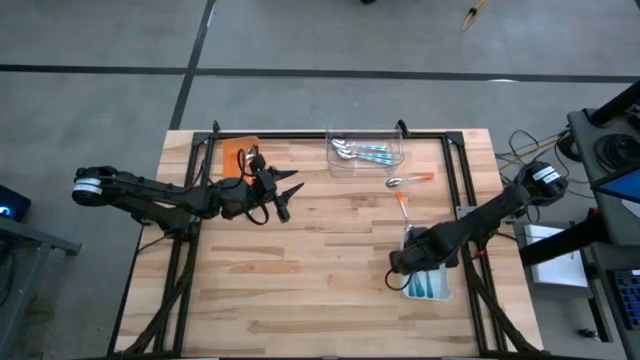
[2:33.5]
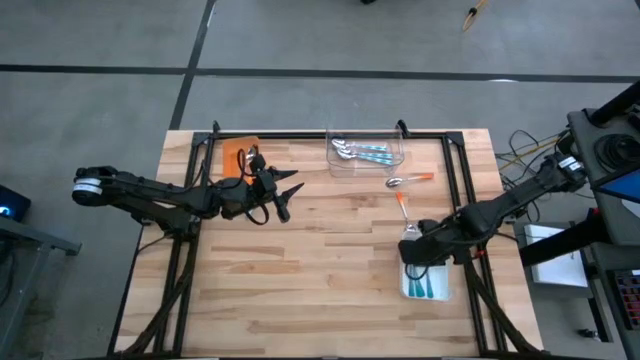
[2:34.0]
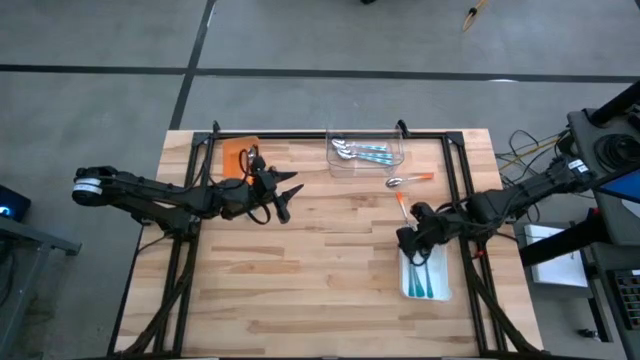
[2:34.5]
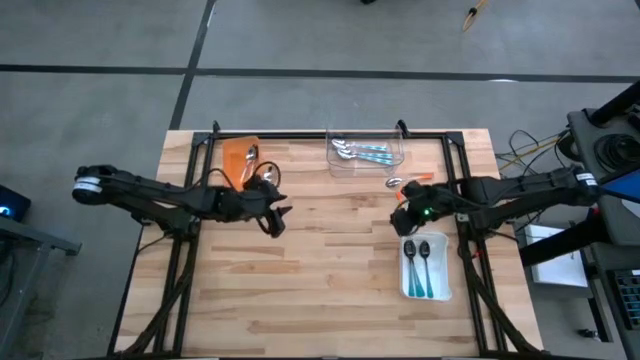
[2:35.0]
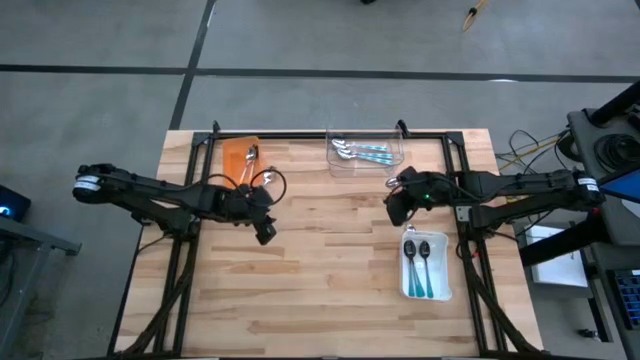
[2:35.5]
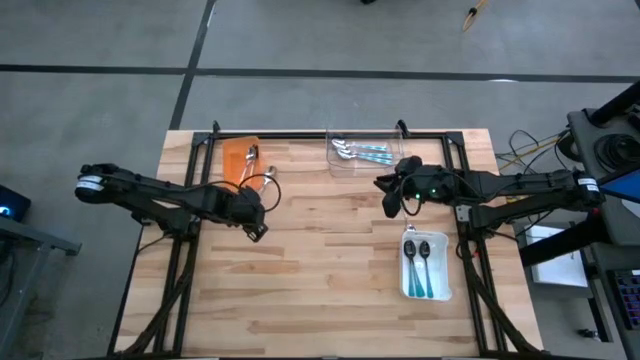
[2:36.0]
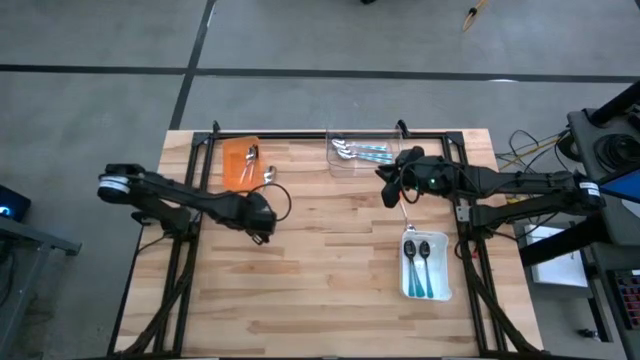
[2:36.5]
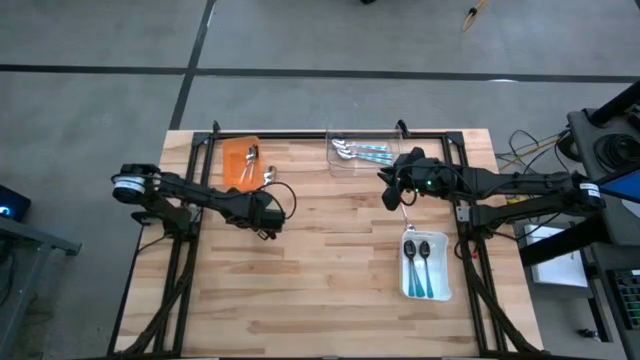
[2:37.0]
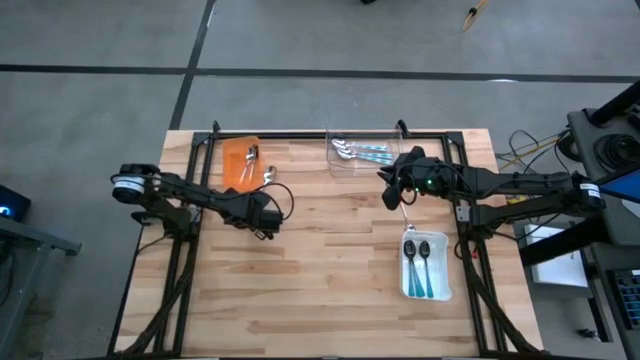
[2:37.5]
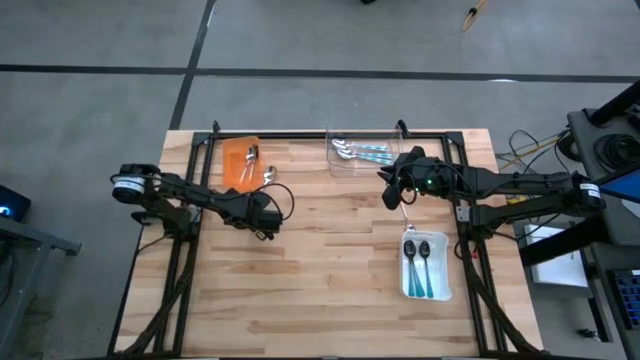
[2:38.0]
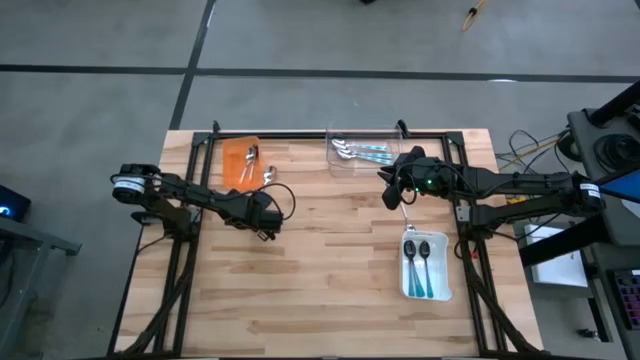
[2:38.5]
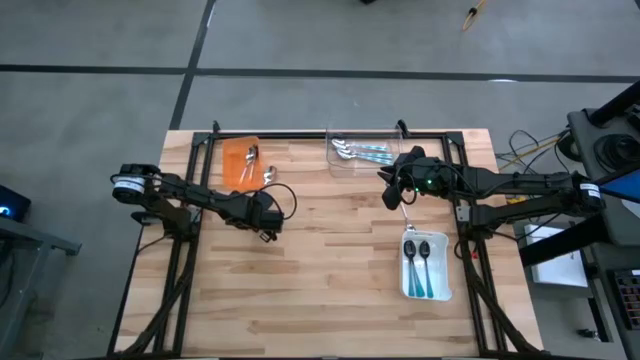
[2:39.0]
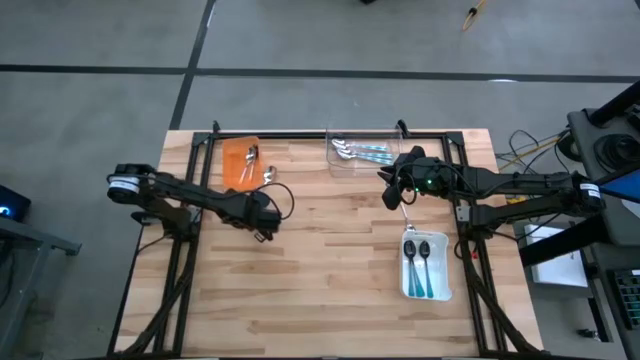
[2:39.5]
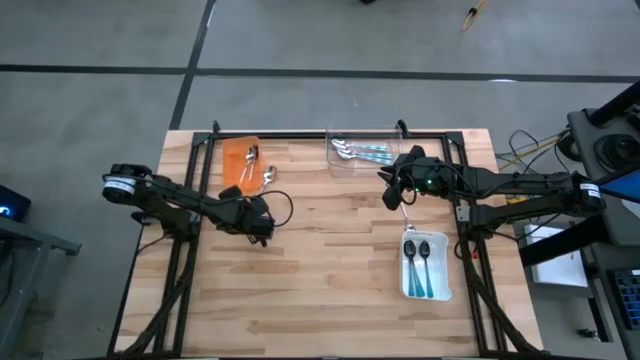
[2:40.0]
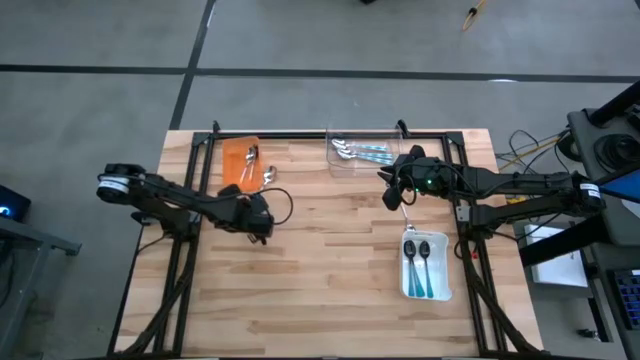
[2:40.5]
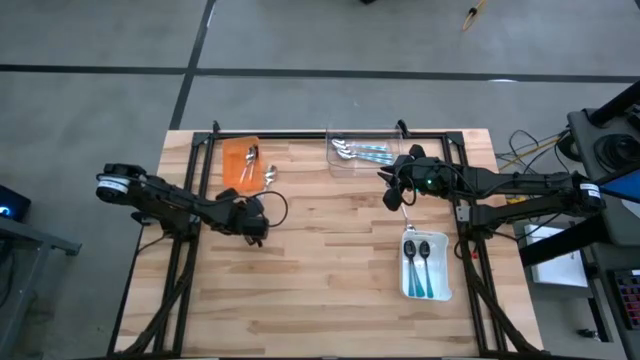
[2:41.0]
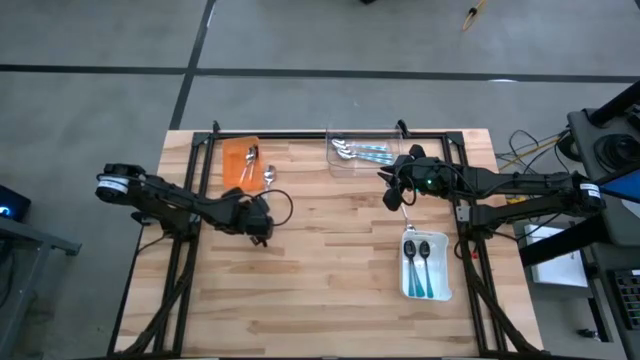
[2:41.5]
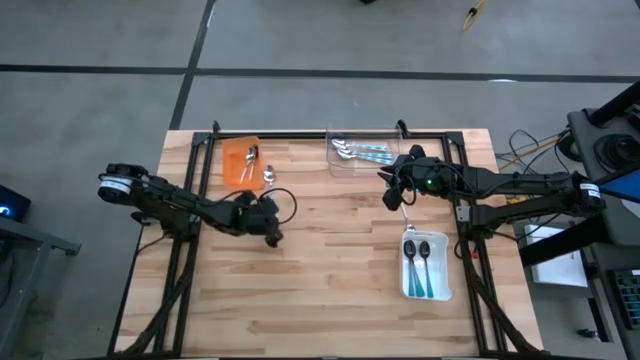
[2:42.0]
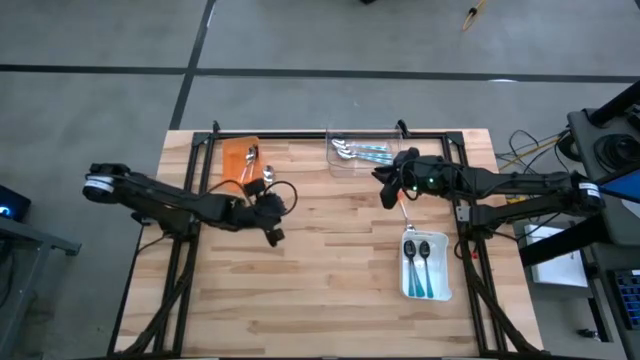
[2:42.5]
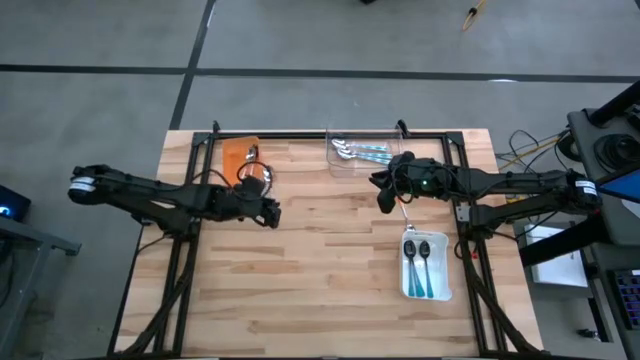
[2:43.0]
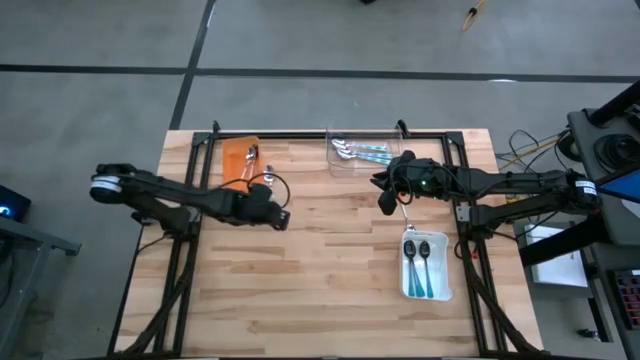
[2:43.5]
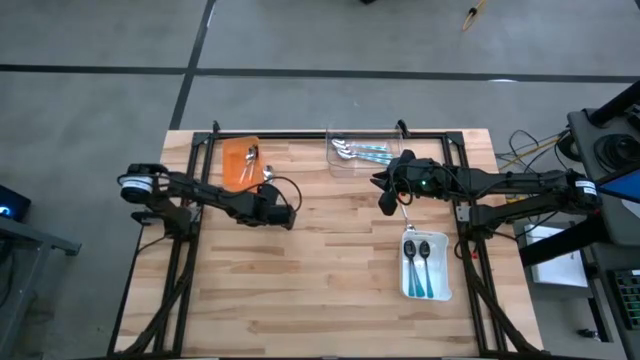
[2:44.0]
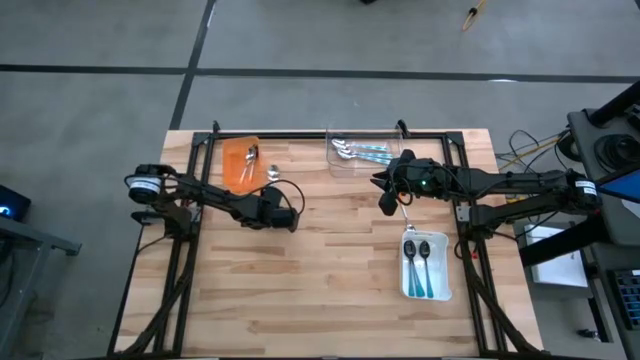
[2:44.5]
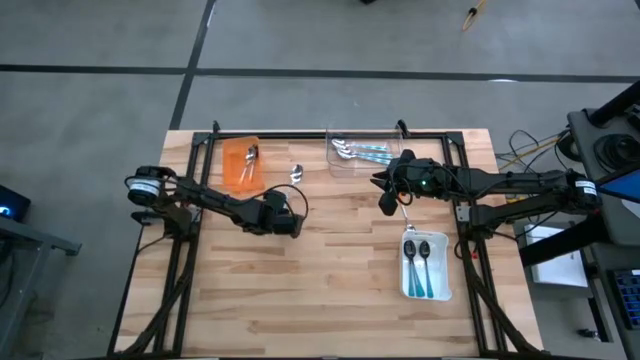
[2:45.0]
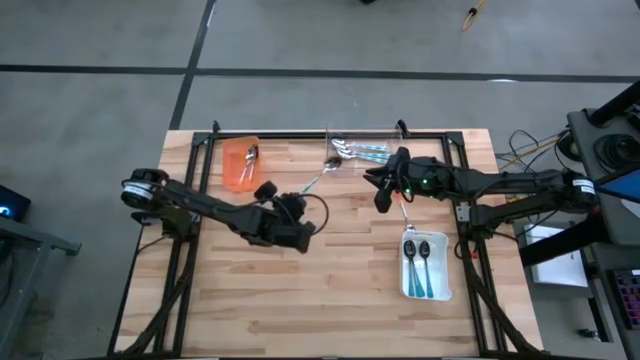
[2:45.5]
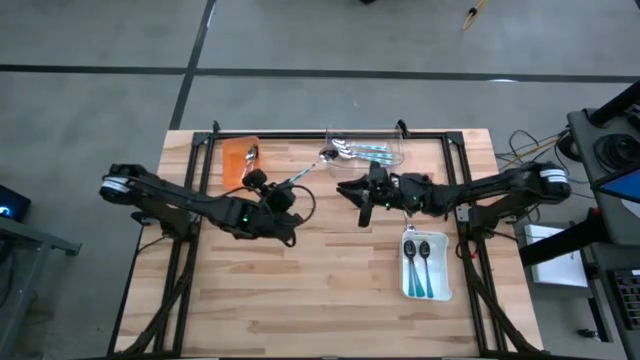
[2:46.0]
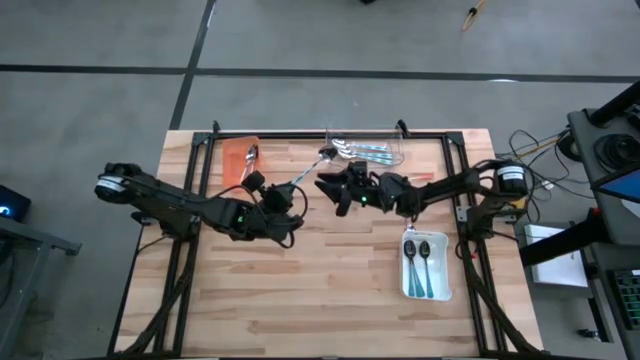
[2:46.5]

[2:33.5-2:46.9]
Task: Sort silverware by color (type)
Put the blue patterned spoon into the transparent bin

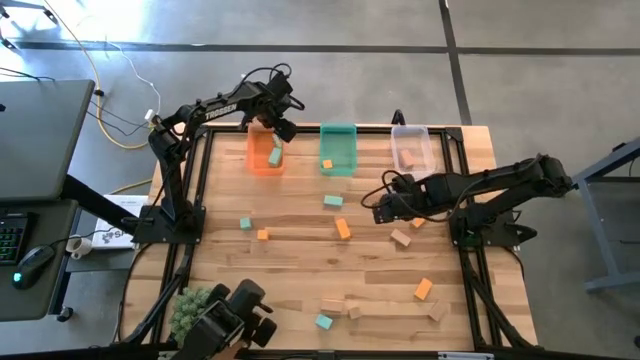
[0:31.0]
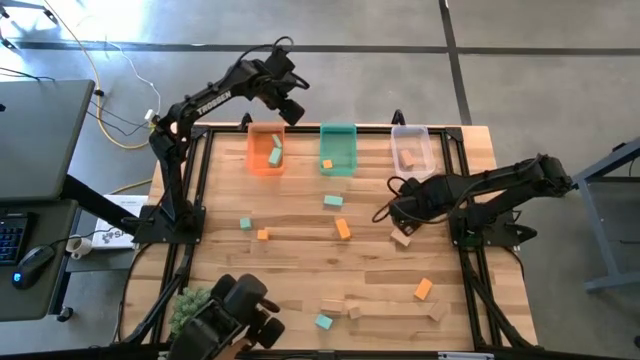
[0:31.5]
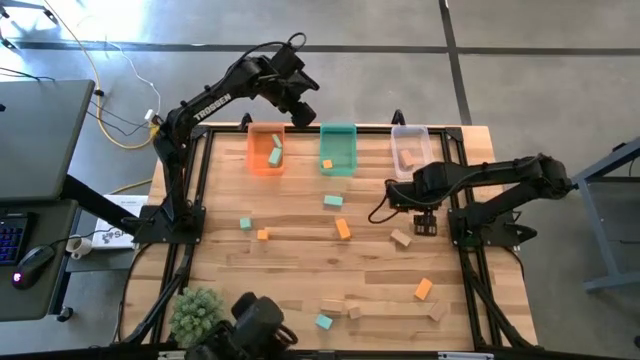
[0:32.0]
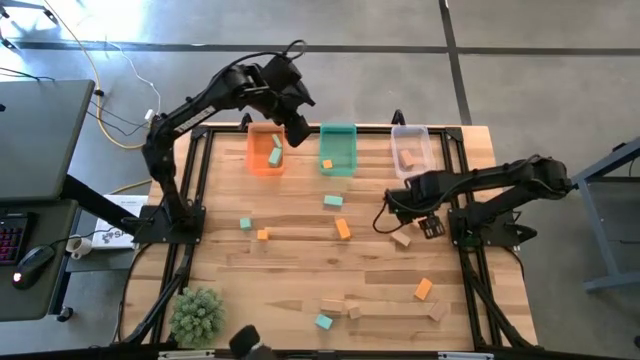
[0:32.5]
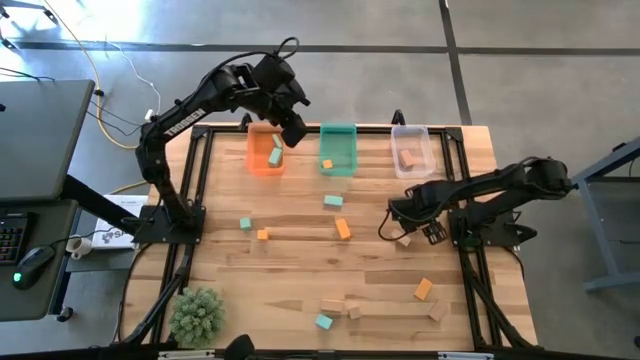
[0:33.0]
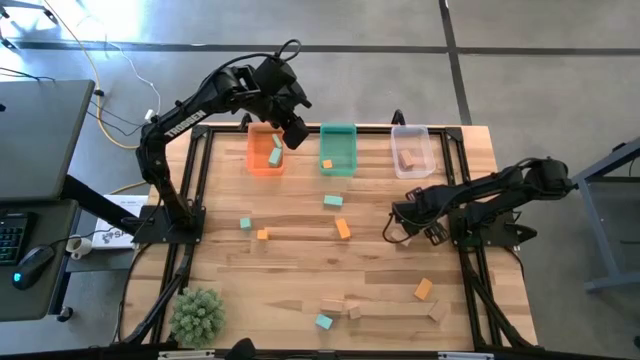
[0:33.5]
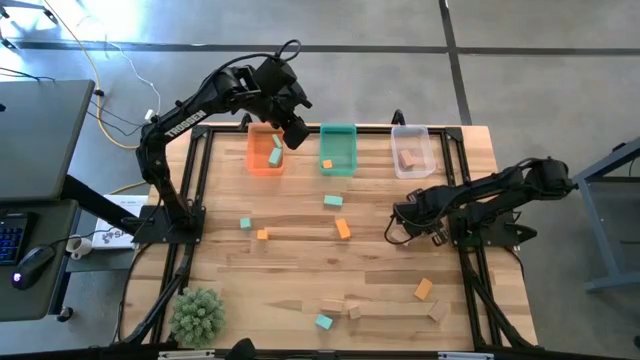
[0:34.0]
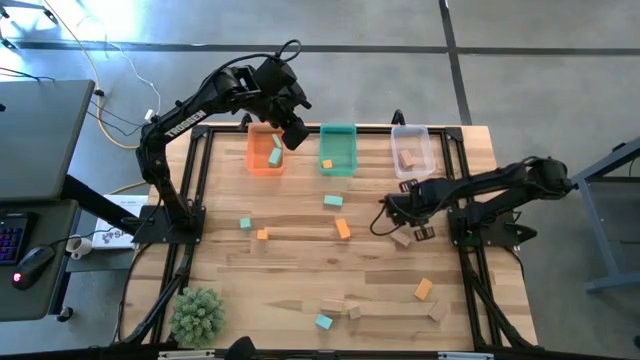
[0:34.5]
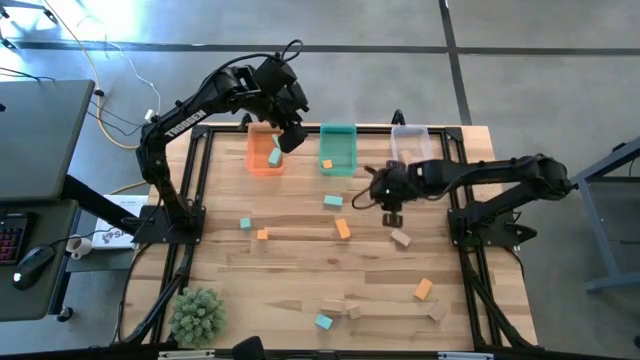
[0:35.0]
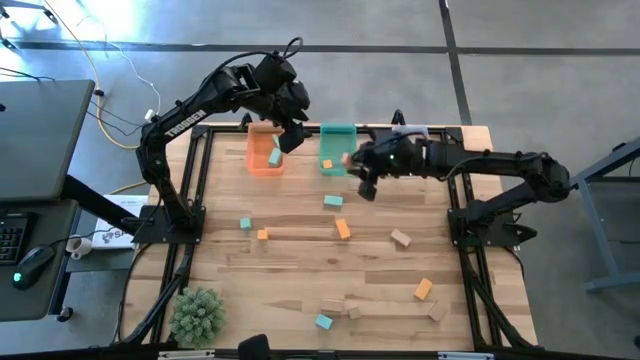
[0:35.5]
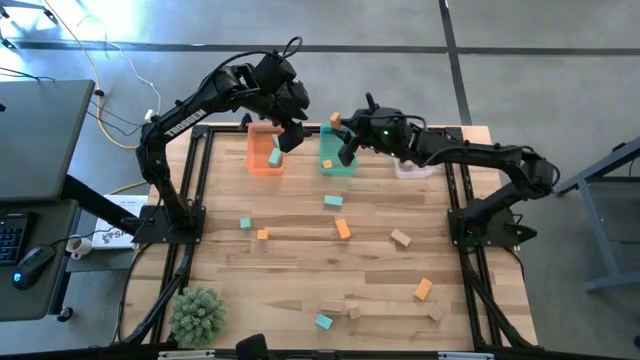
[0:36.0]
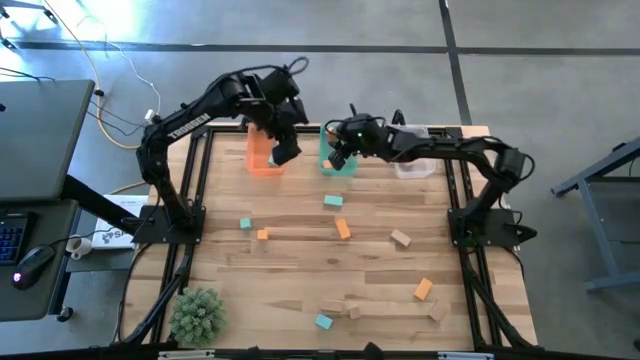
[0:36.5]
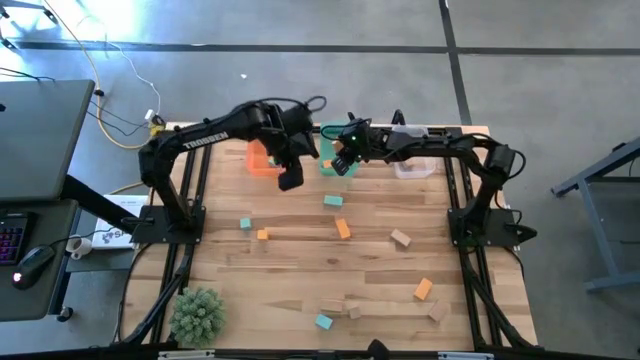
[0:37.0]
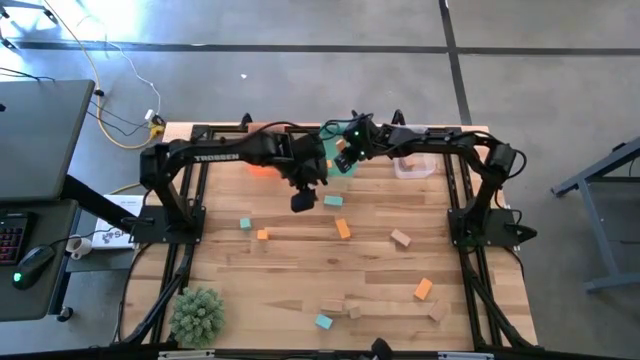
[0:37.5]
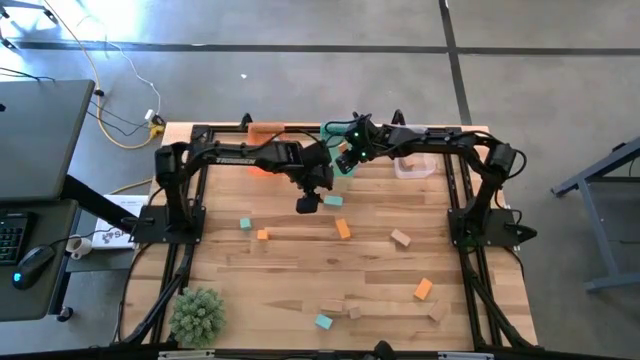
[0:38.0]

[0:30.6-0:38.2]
Task: Sort & place blocks by color
Put the yellow block into the orange bin
